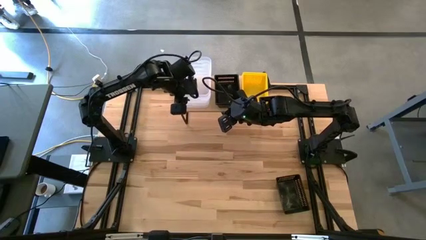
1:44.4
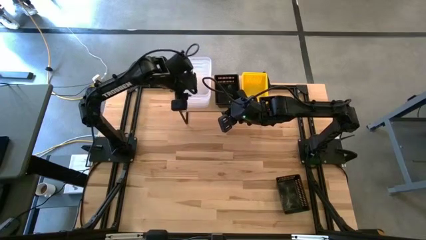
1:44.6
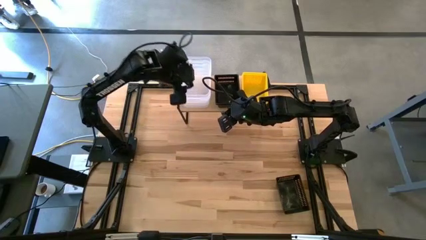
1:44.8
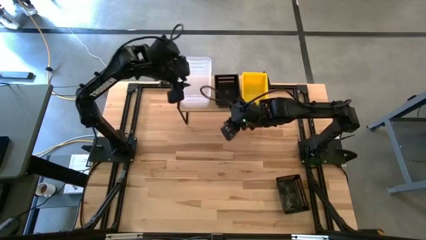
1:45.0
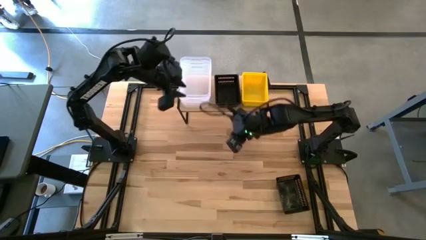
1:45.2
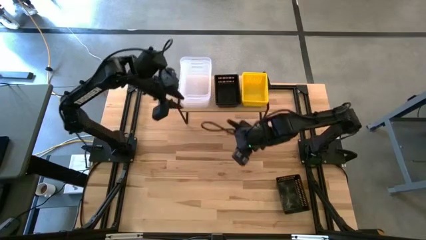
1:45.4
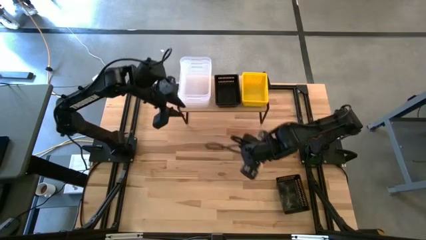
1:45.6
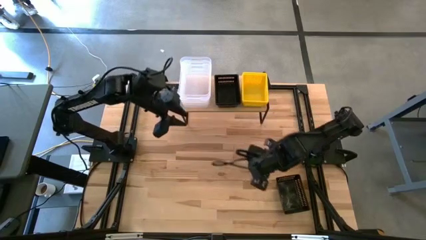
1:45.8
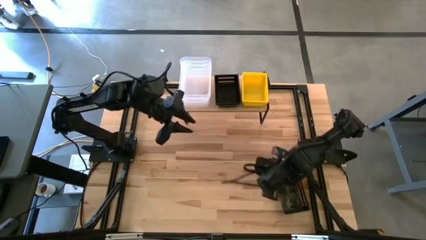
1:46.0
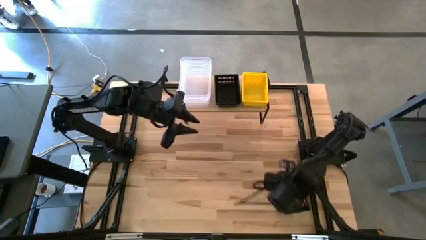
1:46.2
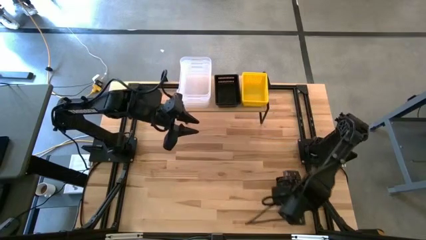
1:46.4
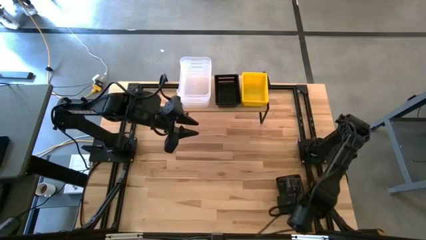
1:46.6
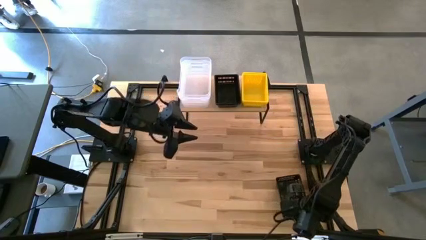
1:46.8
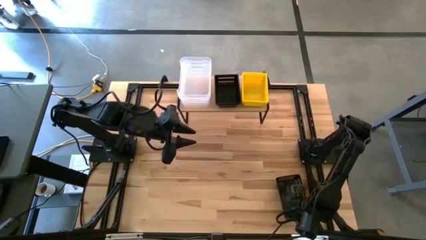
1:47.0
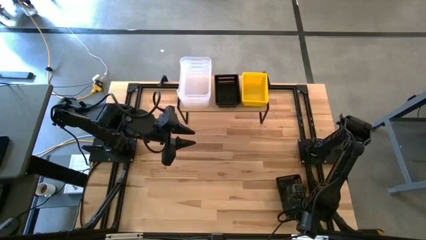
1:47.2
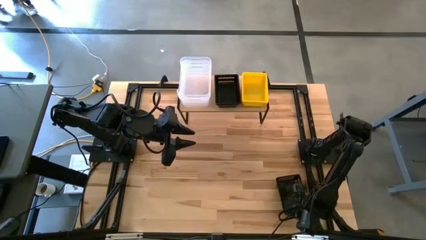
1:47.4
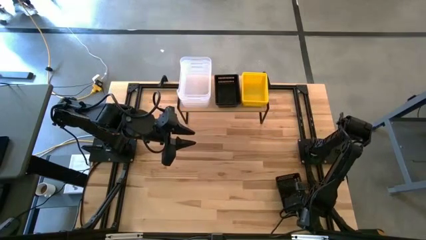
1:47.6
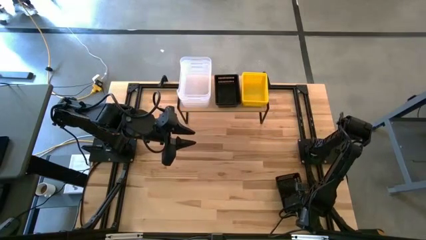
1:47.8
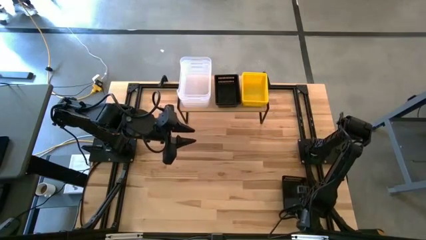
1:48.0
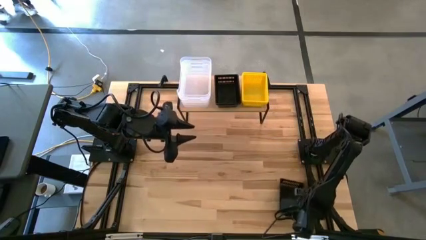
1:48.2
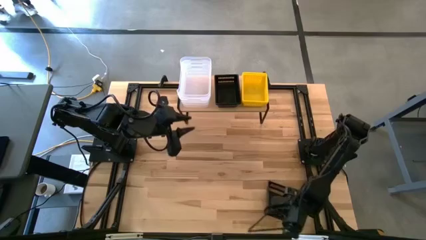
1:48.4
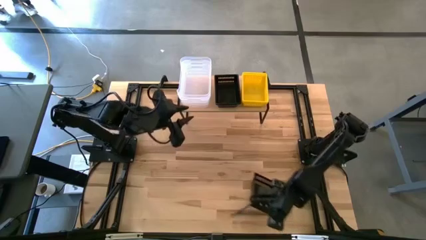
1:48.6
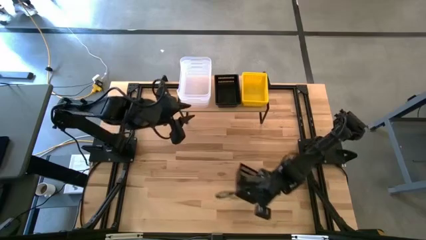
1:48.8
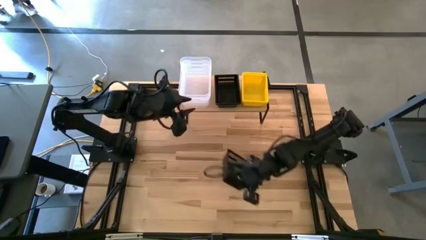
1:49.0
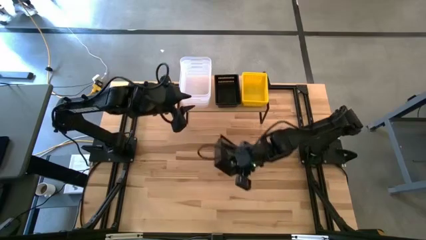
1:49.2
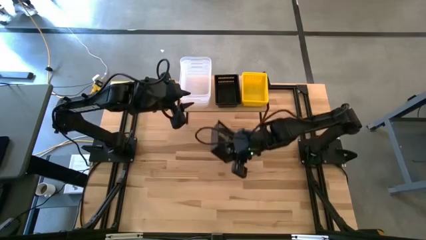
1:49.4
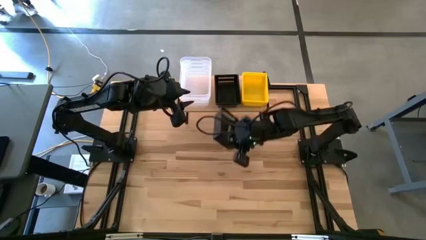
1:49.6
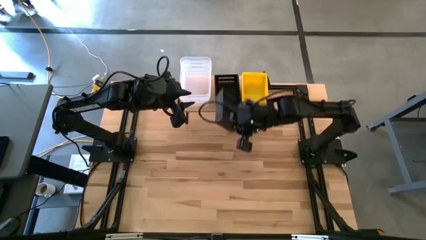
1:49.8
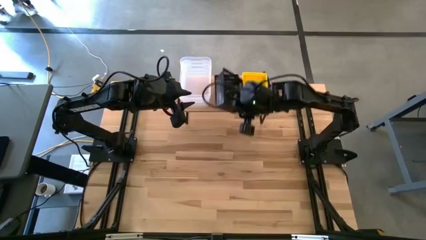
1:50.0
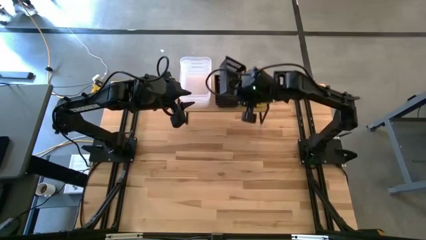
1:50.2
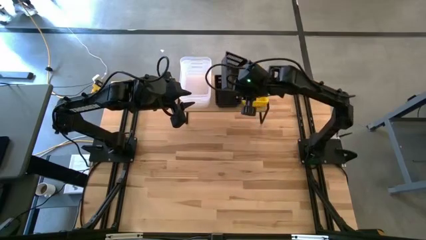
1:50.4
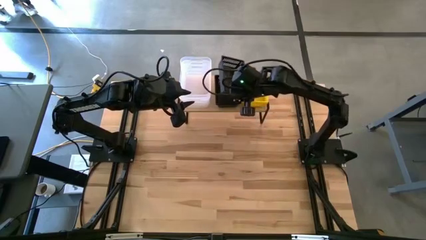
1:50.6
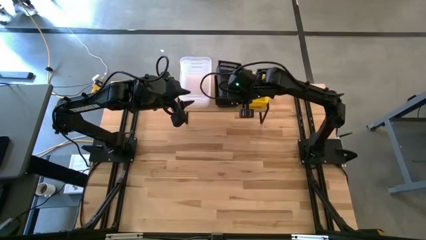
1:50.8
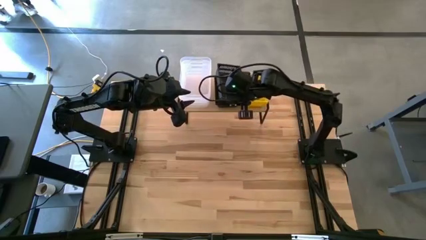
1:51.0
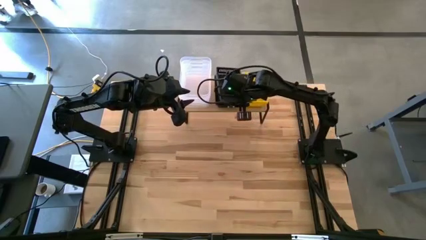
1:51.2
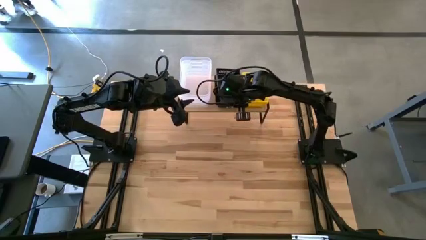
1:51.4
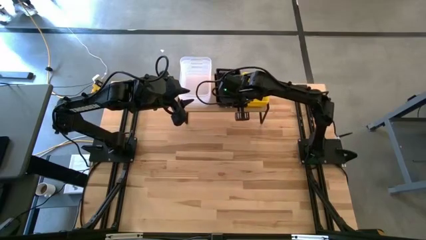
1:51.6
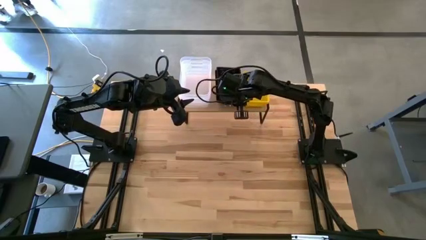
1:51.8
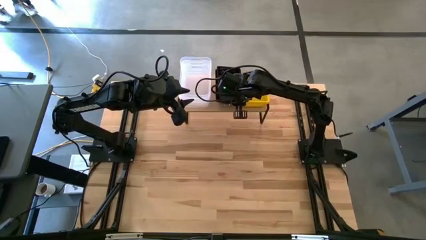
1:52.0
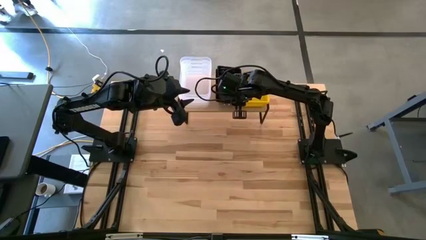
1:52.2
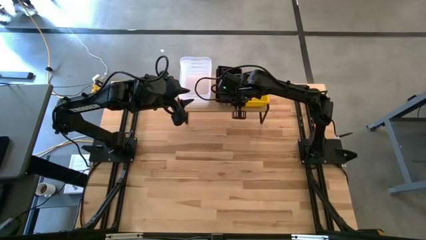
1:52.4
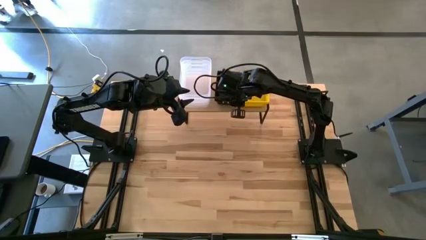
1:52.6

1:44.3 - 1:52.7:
Task: Stack baskets on shelf by color
Stack the black bin on top of the black bin

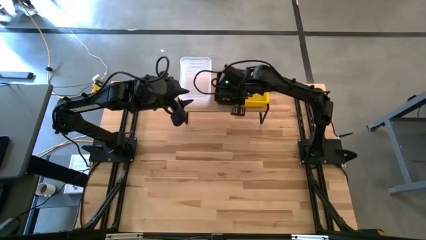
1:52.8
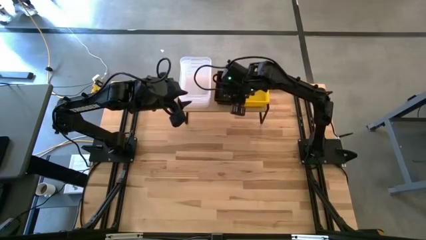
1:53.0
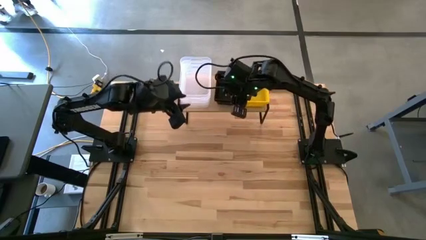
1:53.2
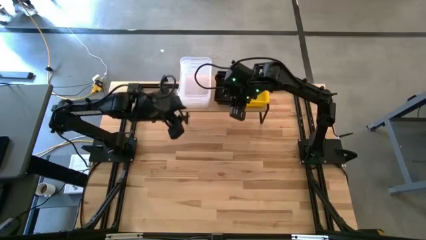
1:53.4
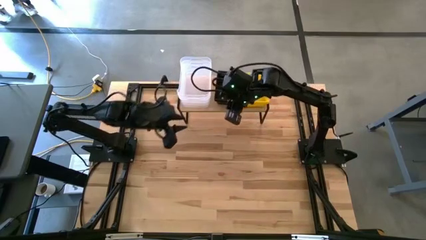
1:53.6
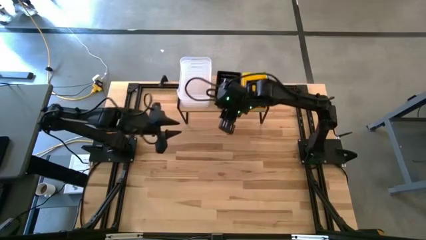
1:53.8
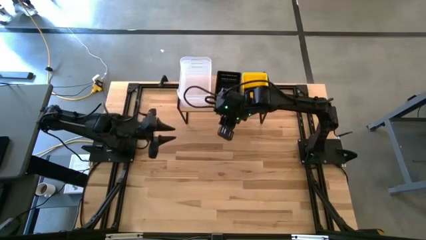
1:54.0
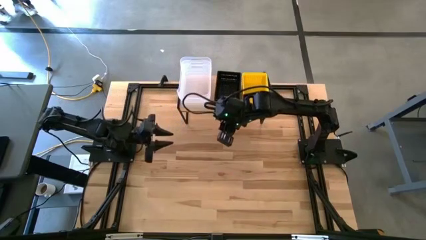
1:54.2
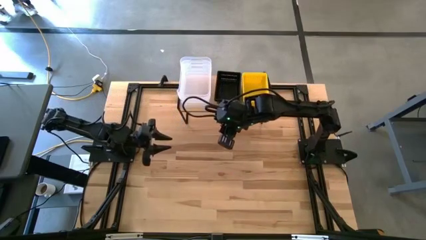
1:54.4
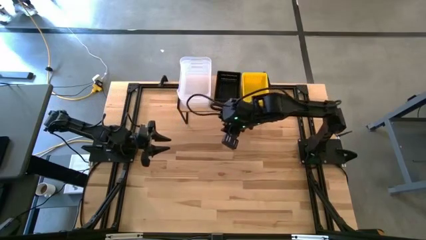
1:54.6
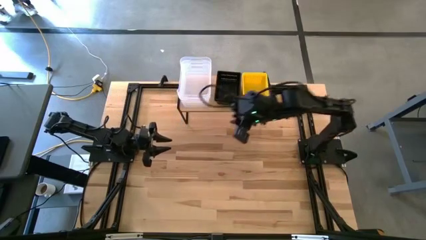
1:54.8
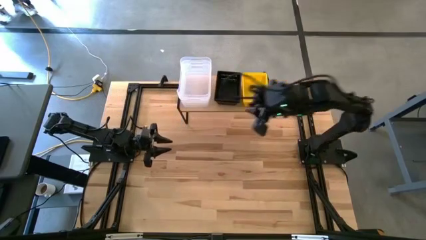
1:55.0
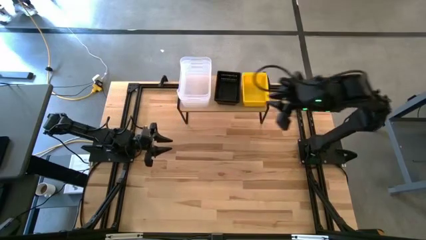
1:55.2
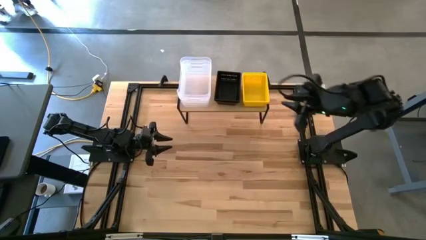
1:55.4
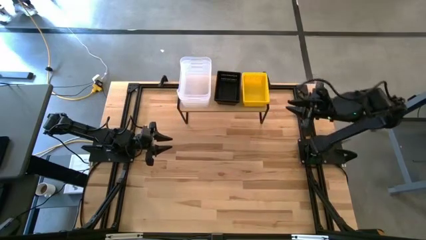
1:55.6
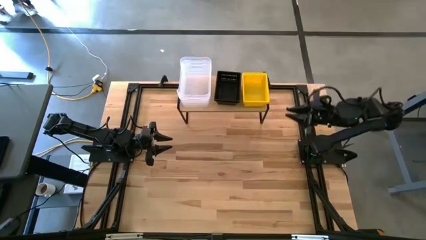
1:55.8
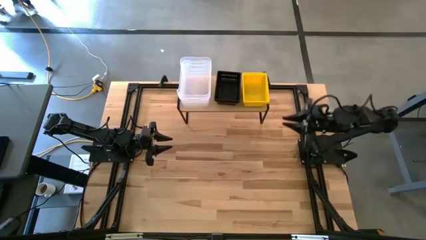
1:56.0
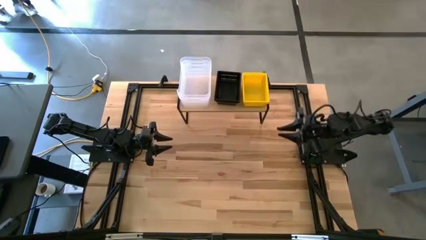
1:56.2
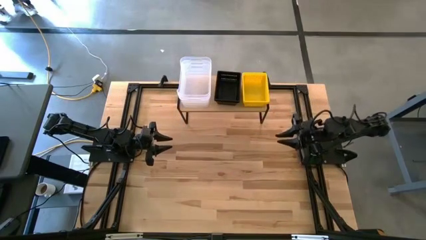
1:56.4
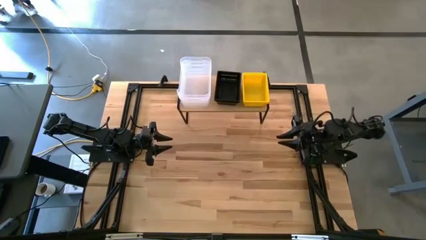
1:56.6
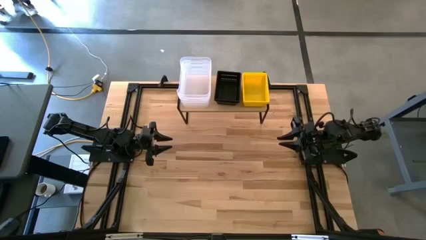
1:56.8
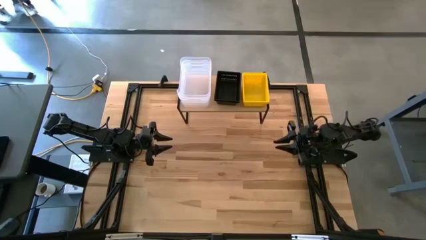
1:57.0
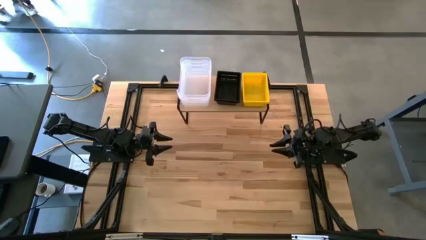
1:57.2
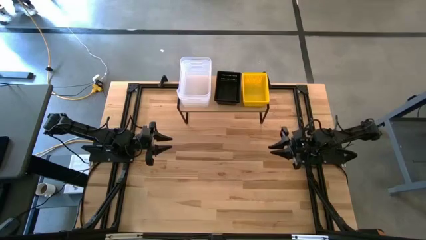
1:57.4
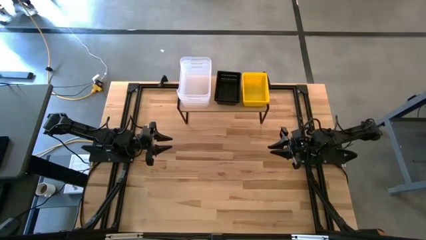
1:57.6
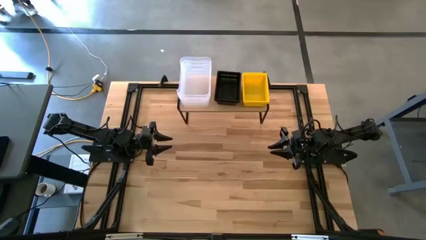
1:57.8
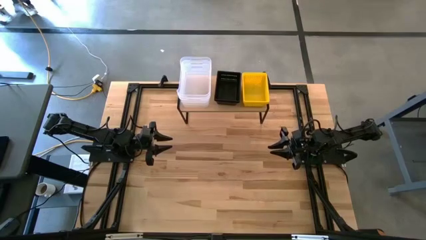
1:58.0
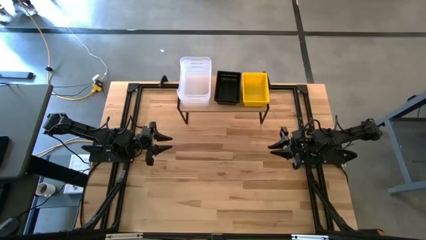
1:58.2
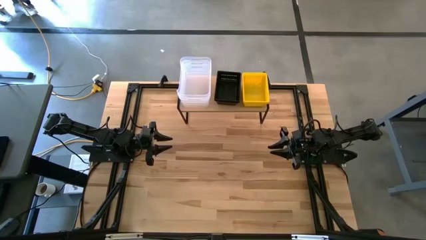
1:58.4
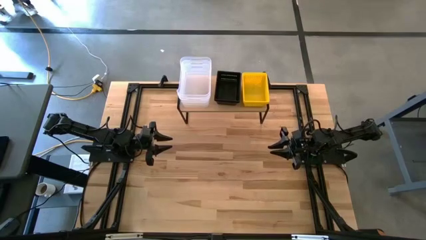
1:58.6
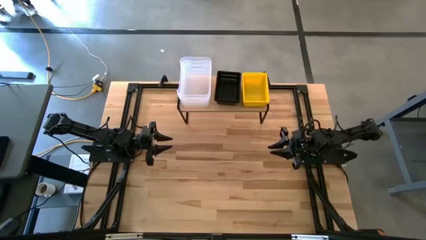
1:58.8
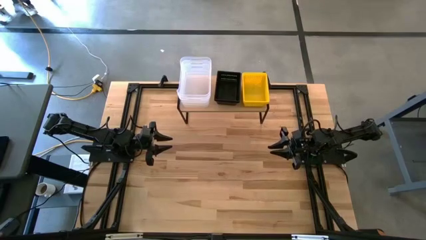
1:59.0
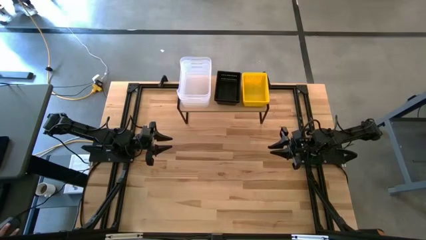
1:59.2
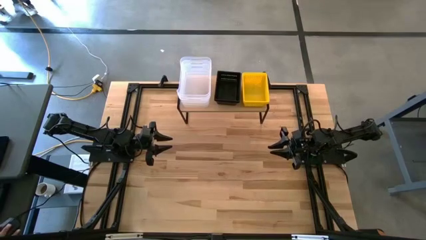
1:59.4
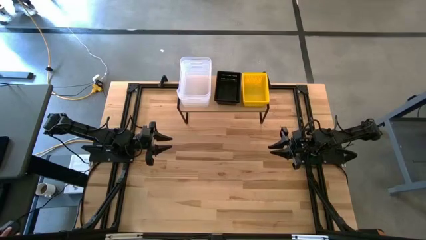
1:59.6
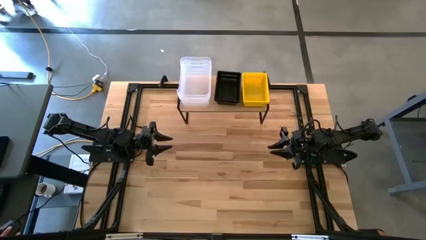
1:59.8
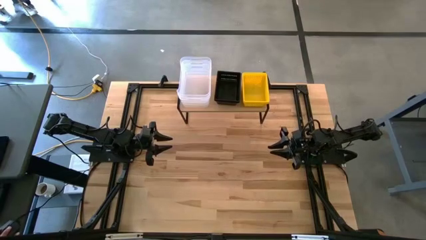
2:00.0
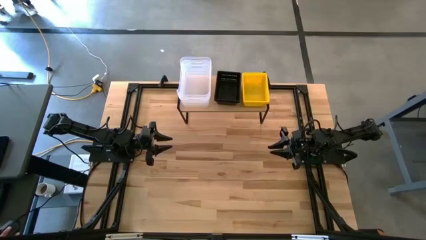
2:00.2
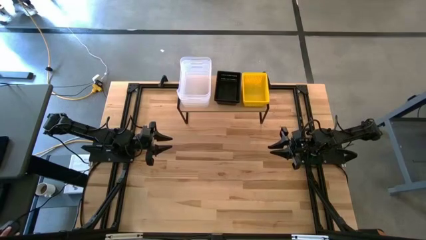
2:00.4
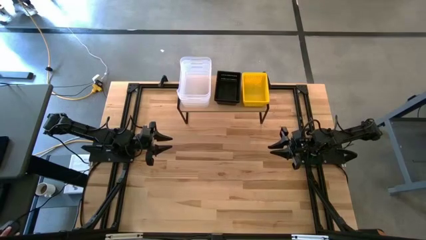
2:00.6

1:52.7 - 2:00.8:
Return to home position
